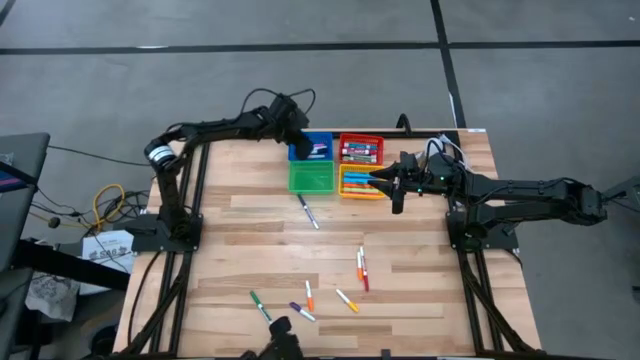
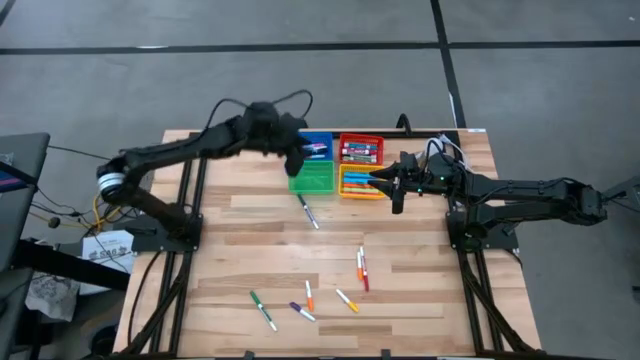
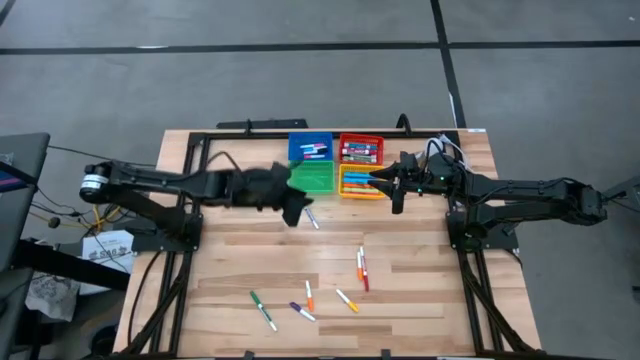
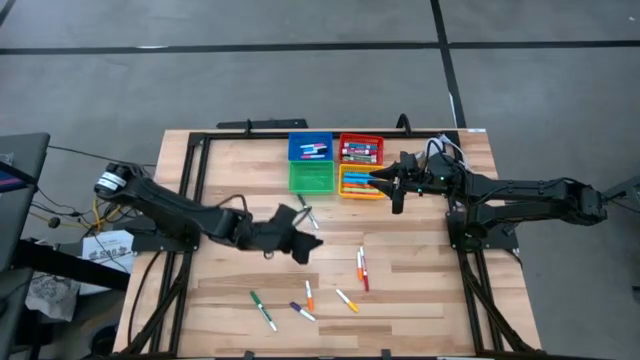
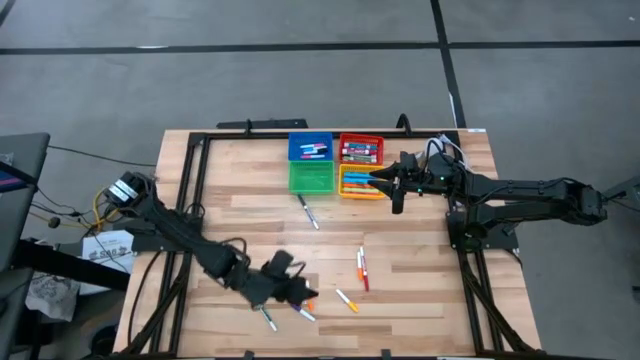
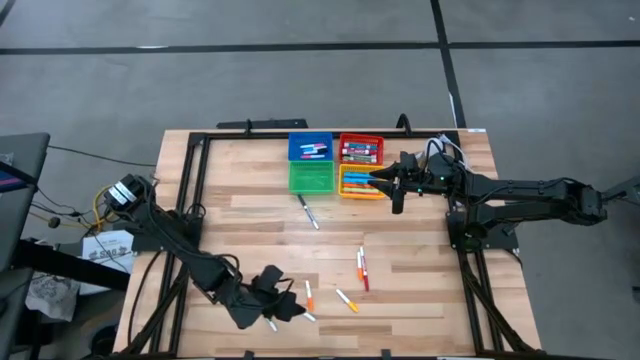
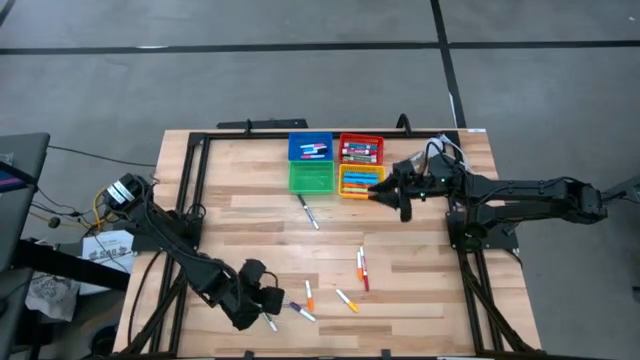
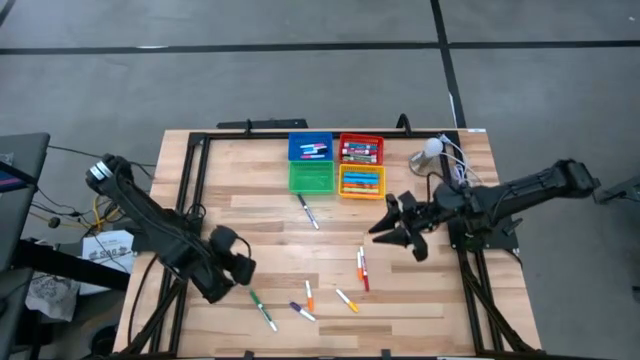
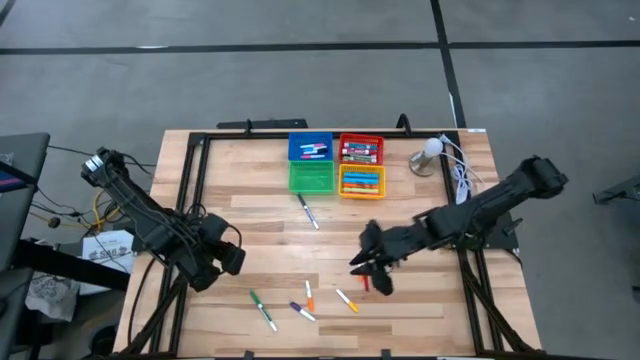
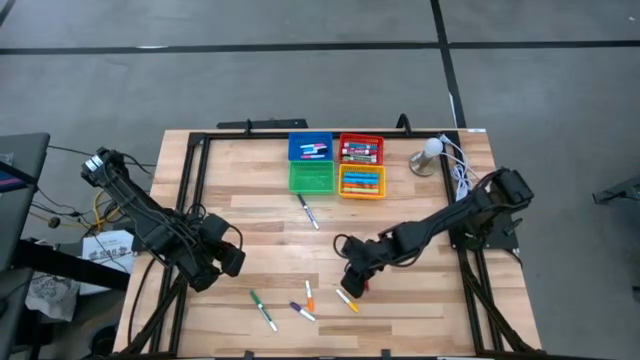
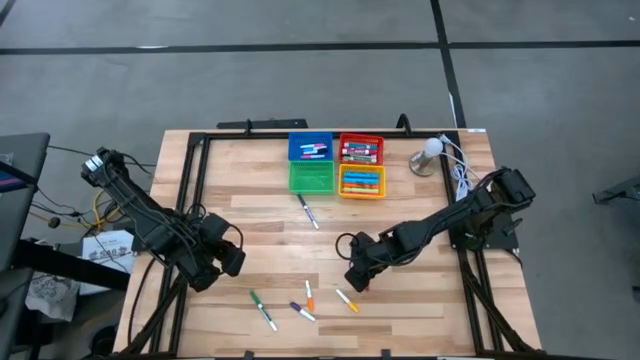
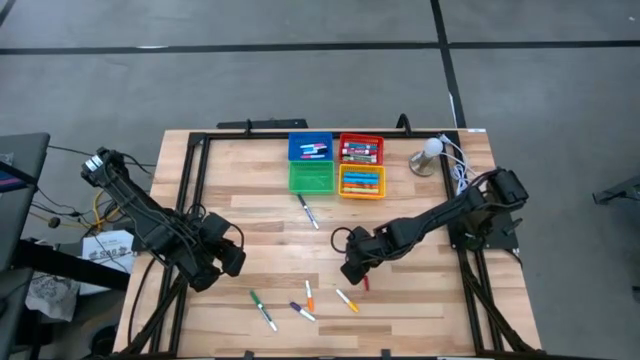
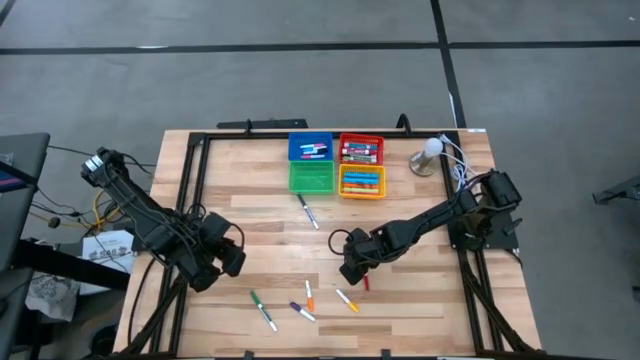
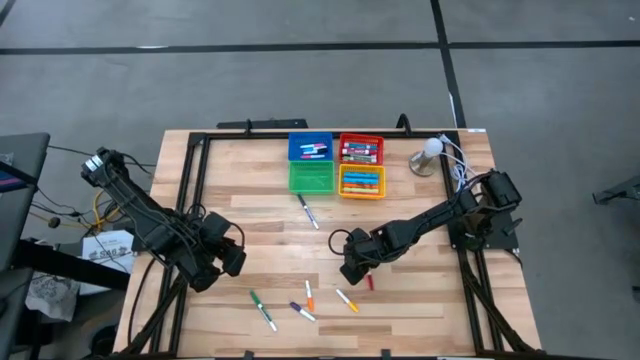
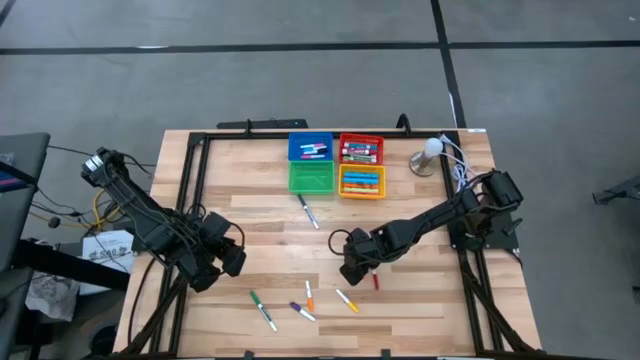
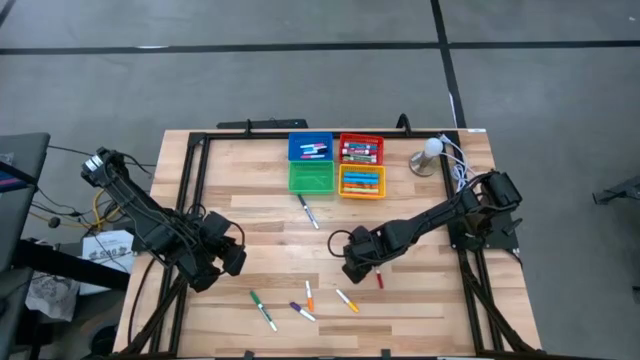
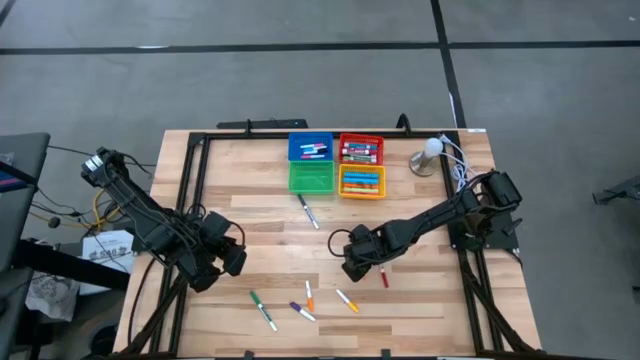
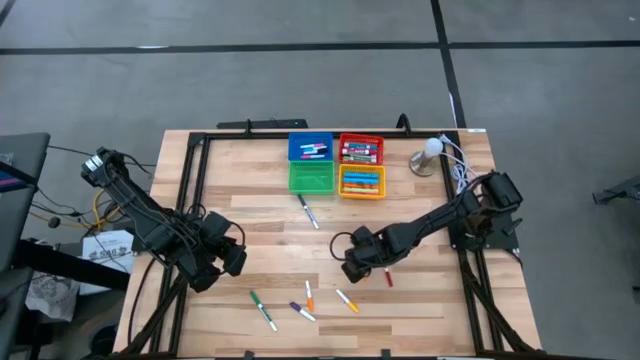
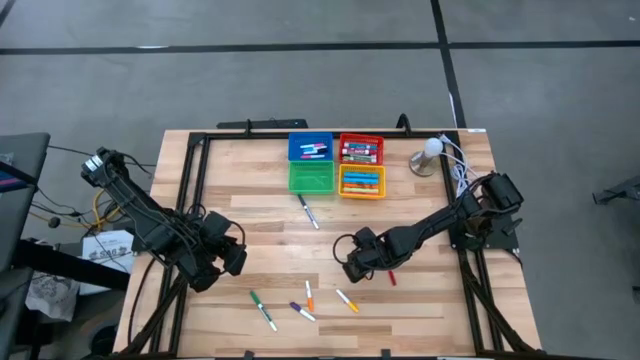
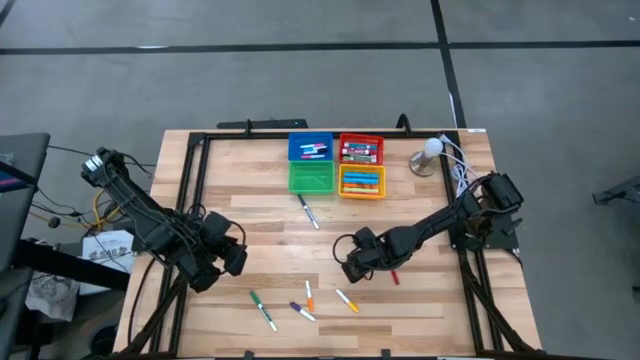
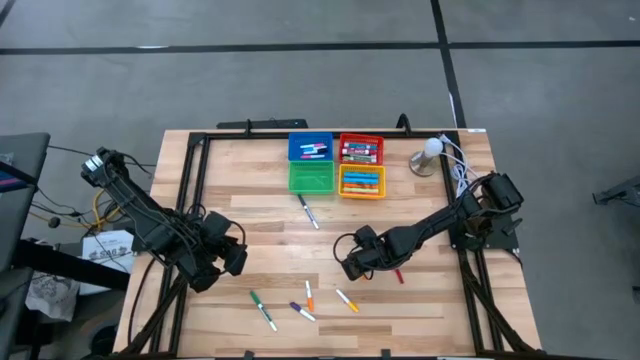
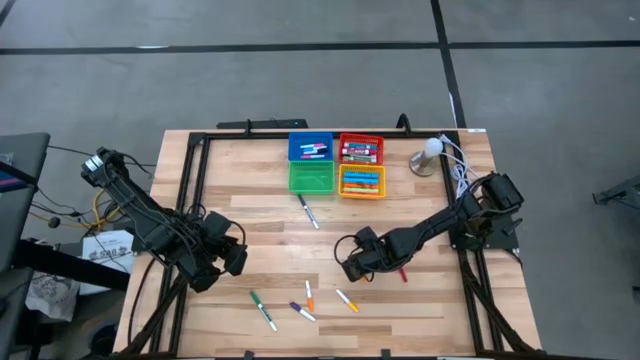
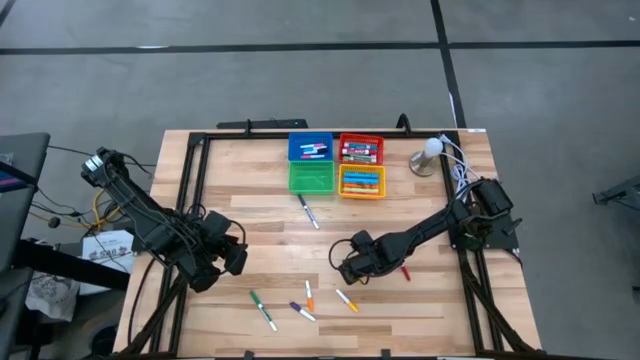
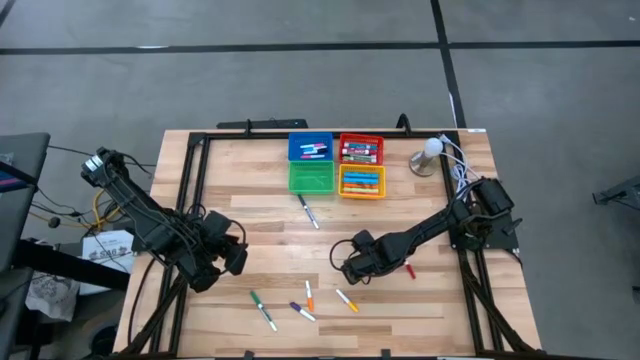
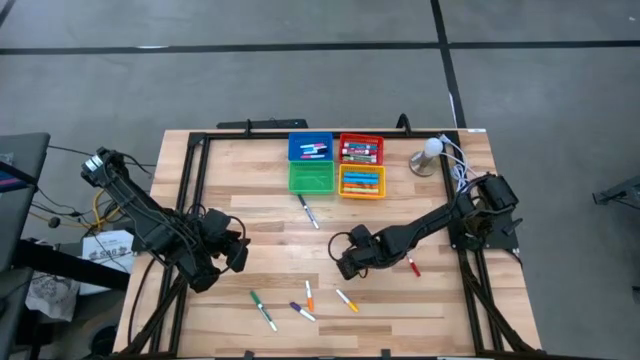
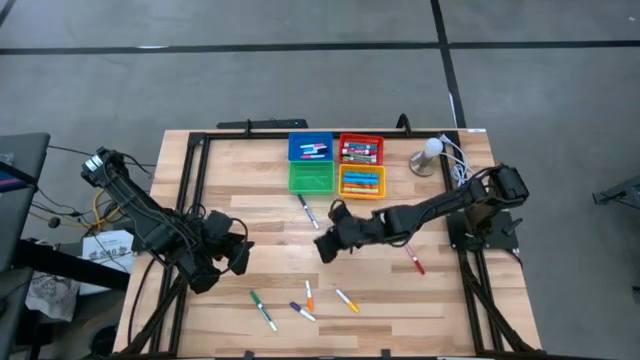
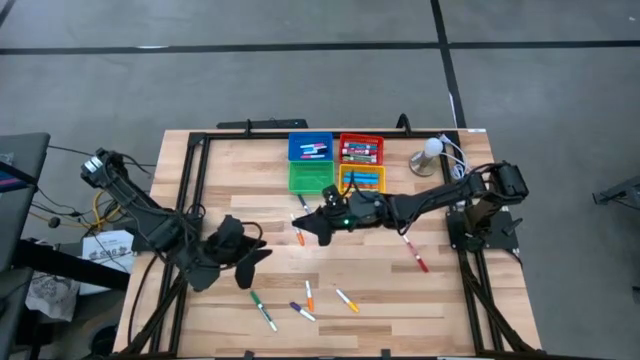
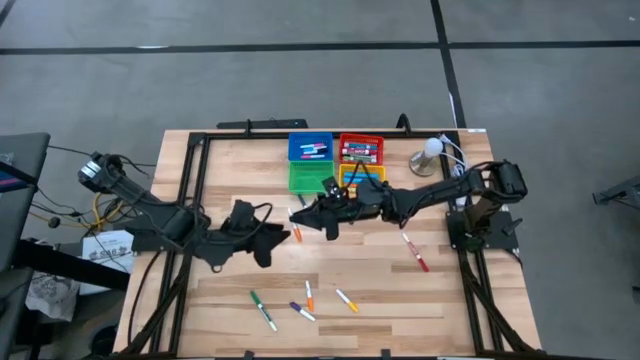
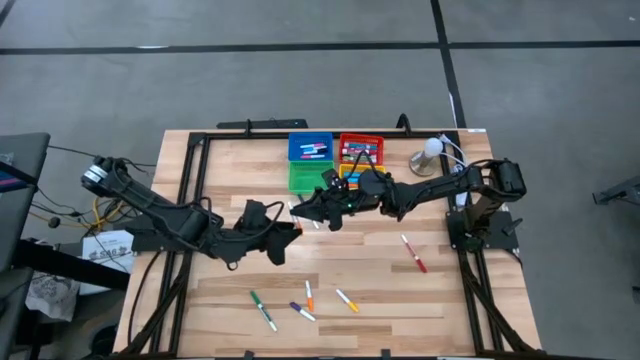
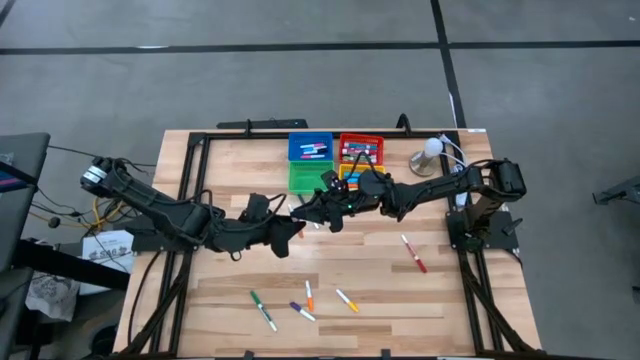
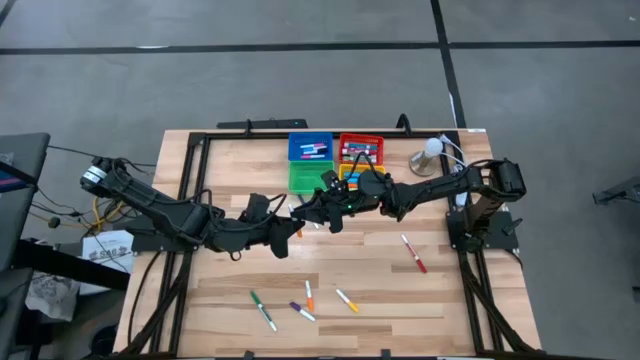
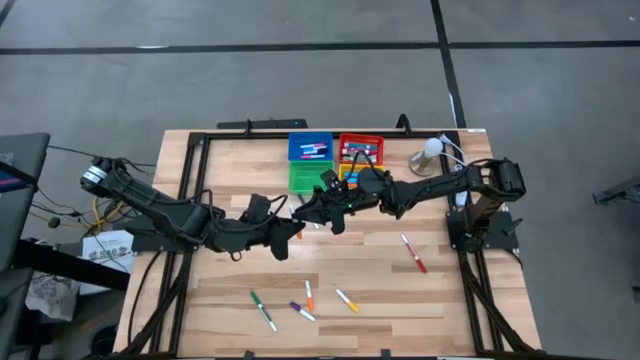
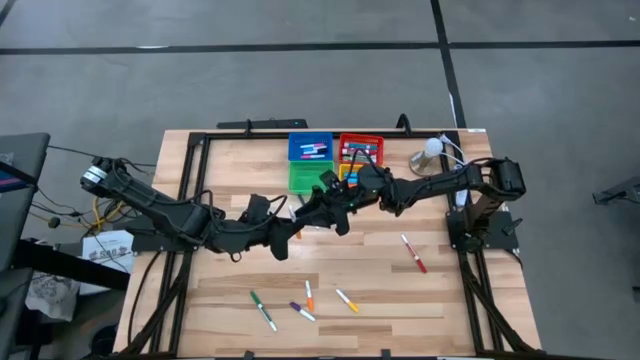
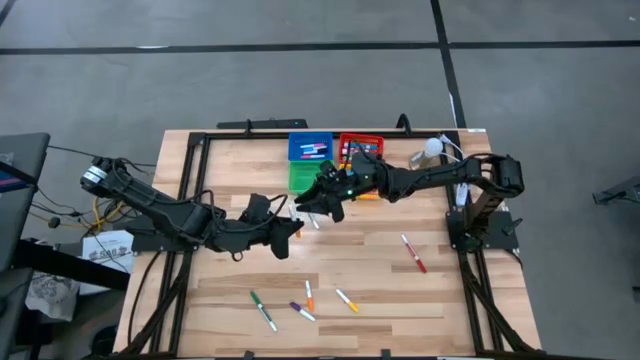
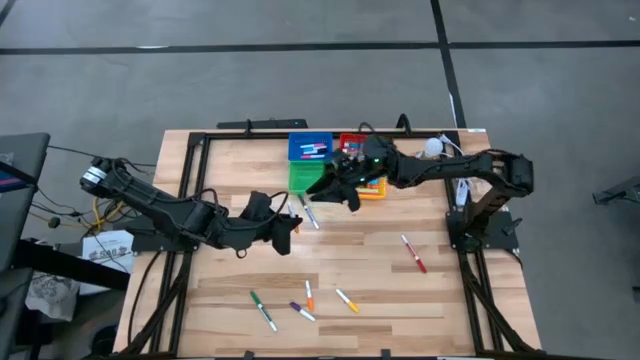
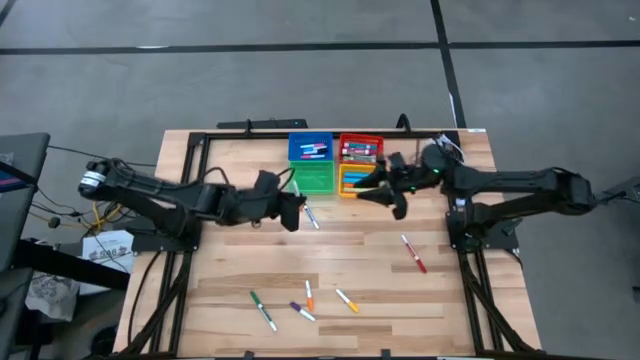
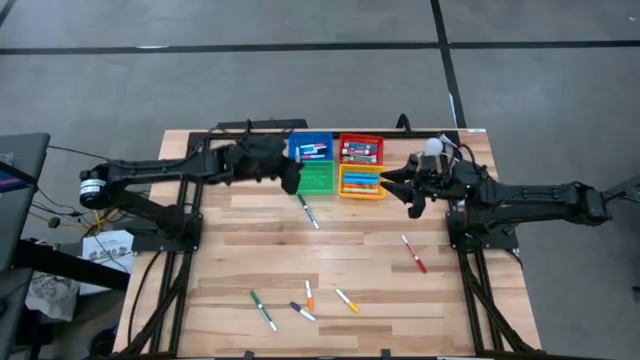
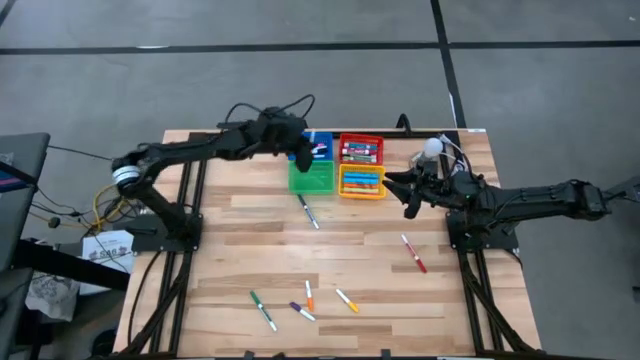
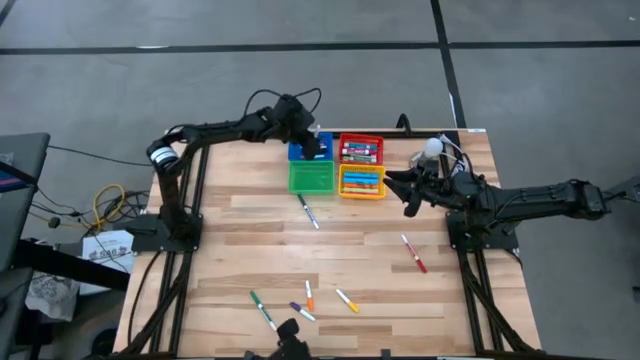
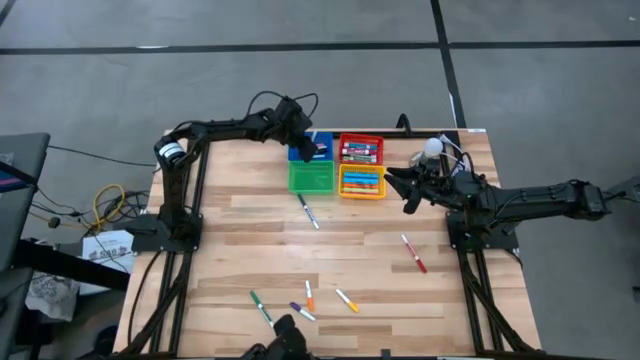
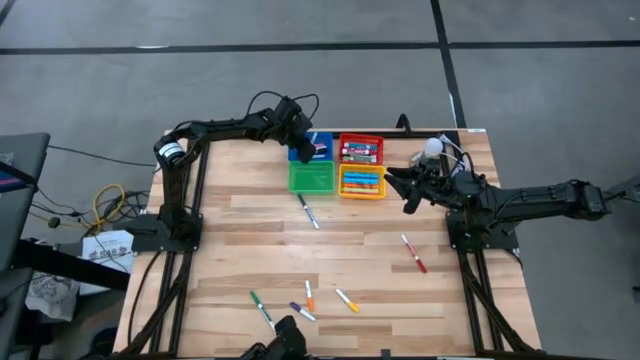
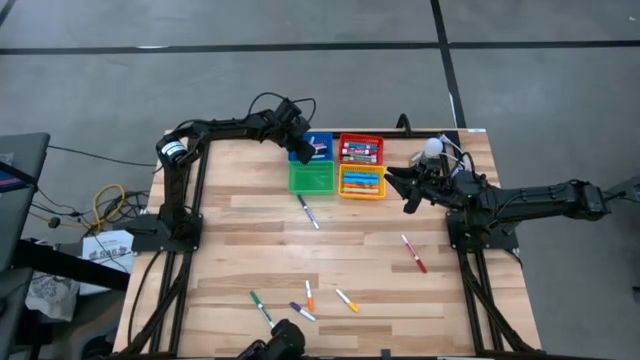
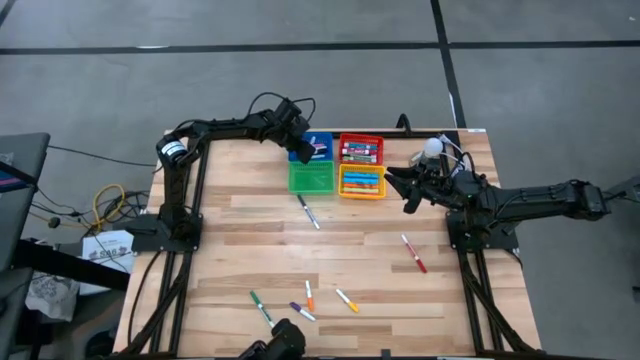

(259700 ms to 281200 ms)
Task: Pick & Place Markers
Put the right orange pen into the blue bin
